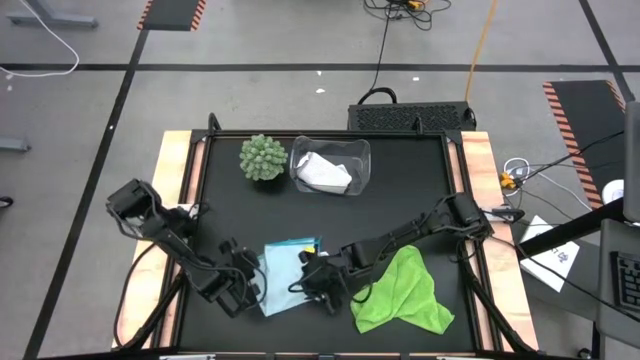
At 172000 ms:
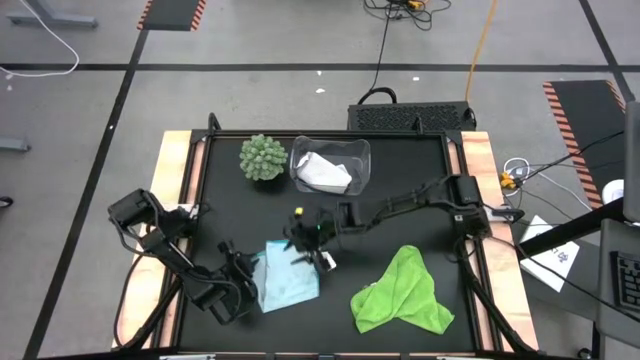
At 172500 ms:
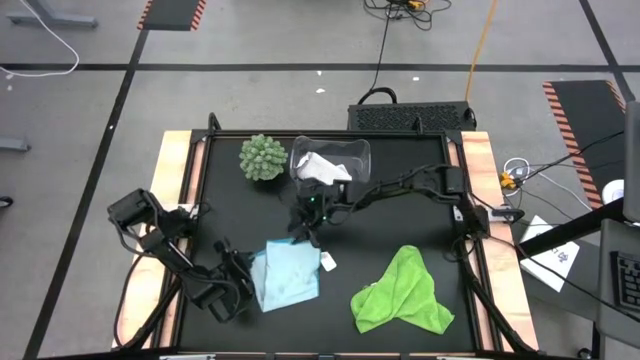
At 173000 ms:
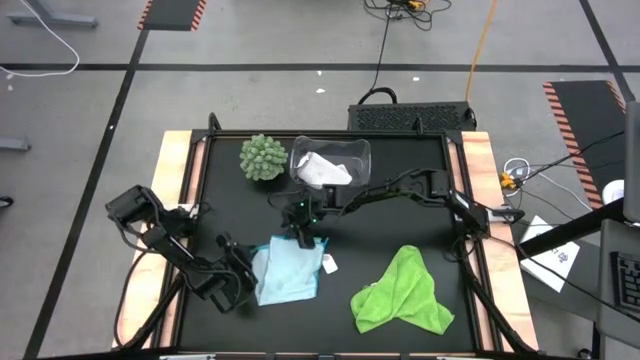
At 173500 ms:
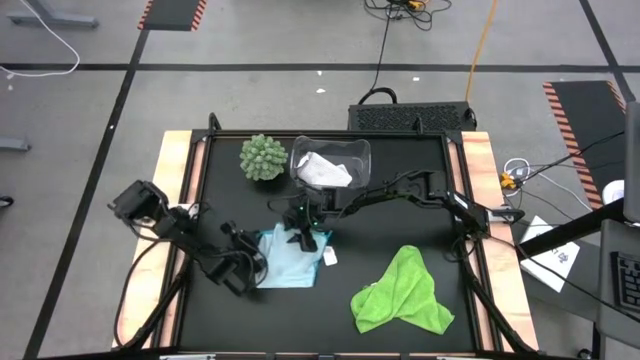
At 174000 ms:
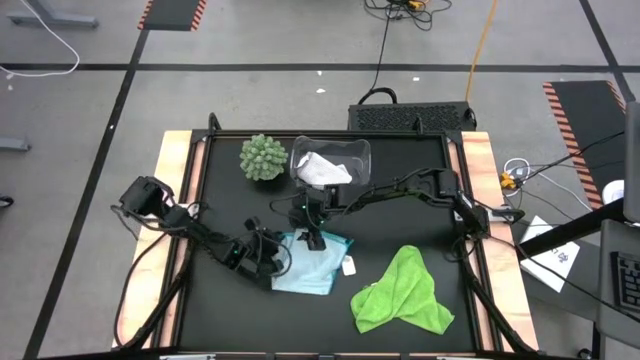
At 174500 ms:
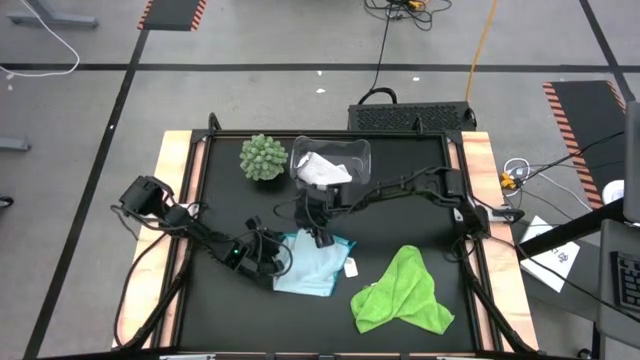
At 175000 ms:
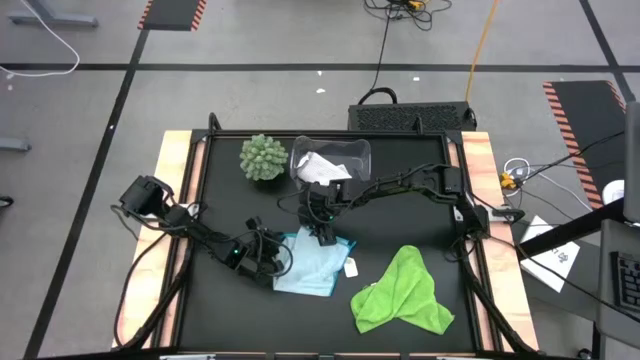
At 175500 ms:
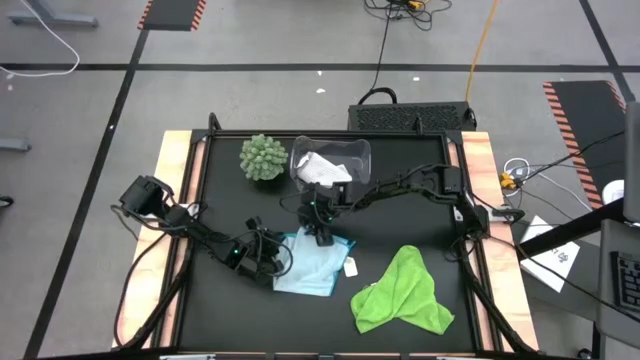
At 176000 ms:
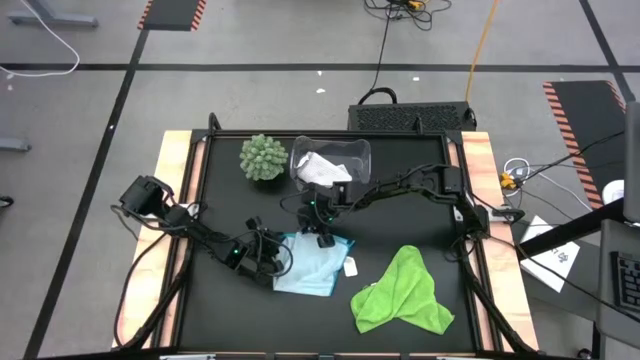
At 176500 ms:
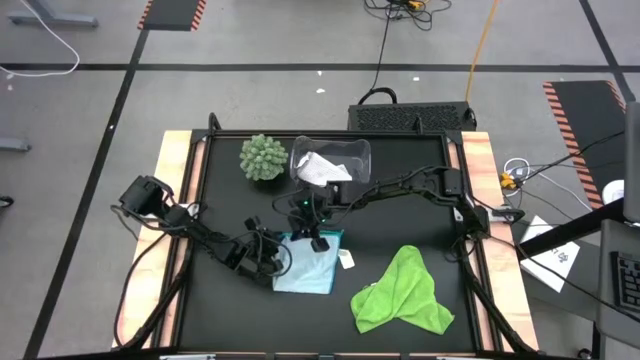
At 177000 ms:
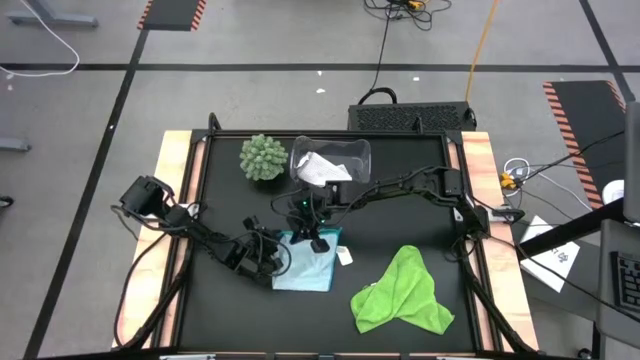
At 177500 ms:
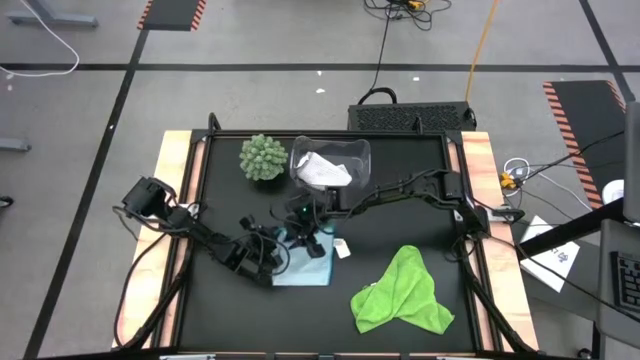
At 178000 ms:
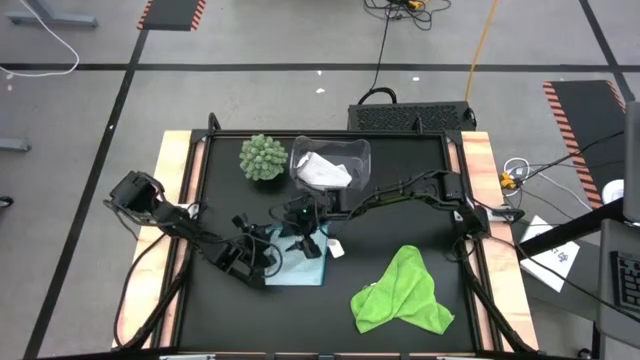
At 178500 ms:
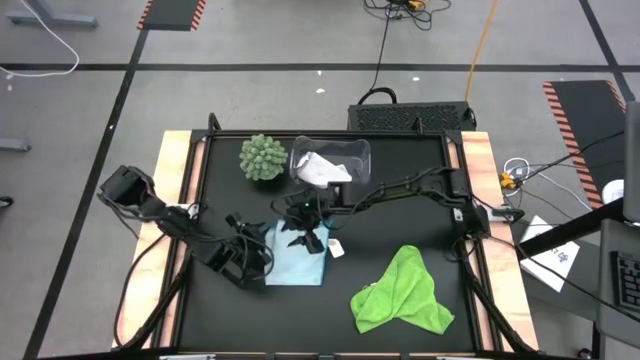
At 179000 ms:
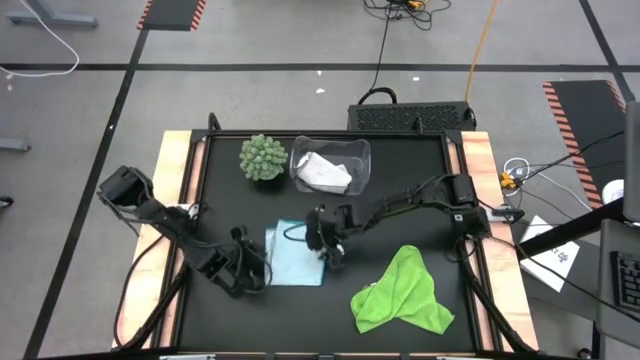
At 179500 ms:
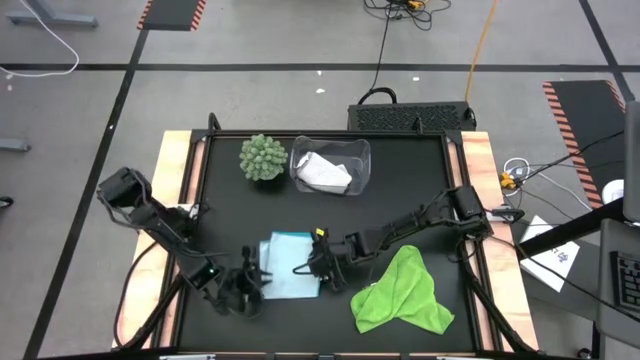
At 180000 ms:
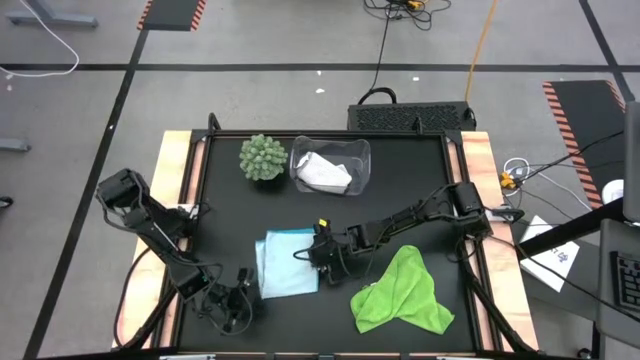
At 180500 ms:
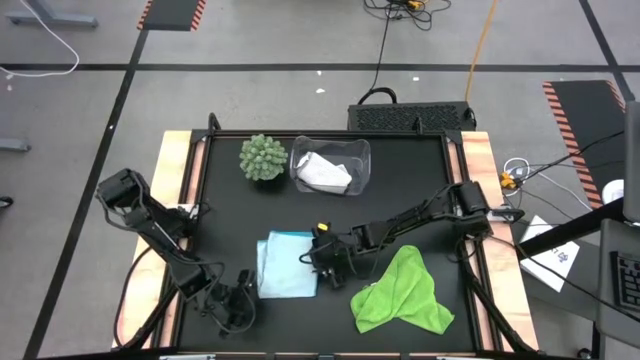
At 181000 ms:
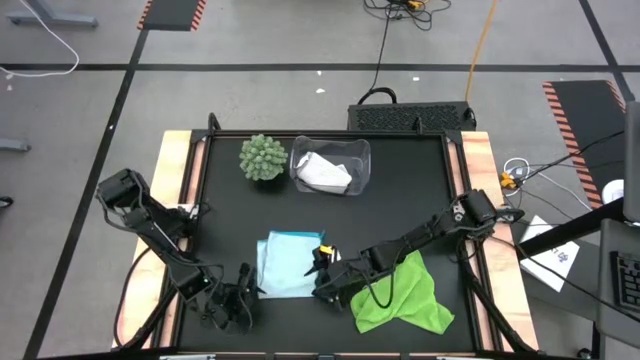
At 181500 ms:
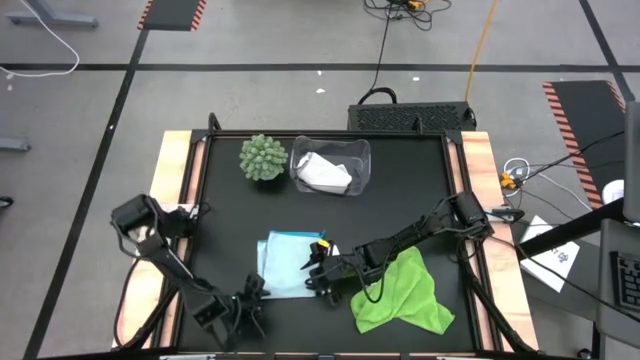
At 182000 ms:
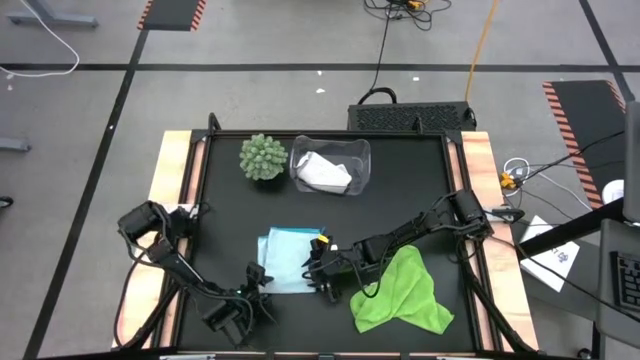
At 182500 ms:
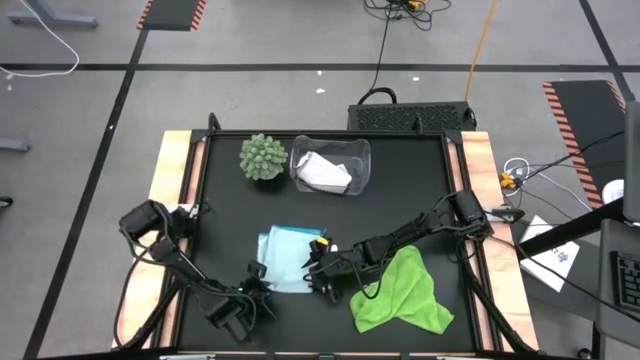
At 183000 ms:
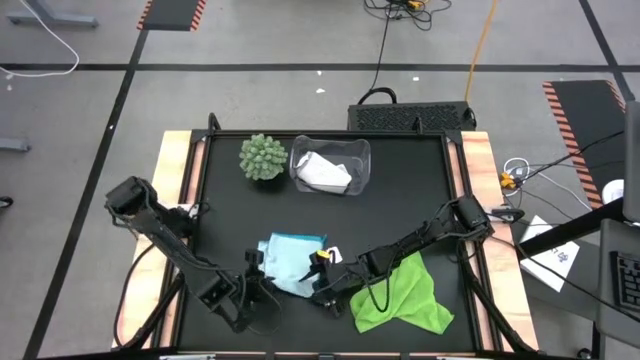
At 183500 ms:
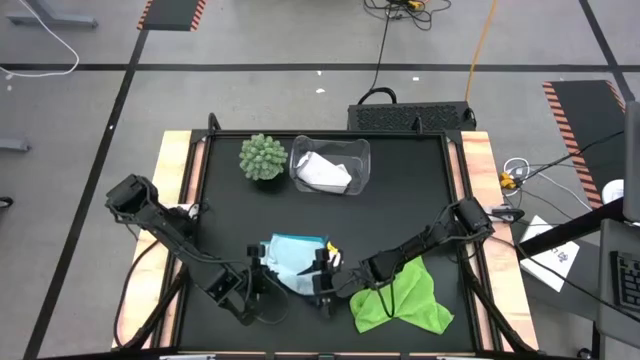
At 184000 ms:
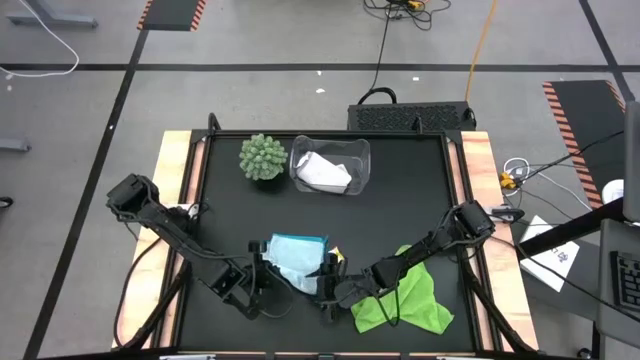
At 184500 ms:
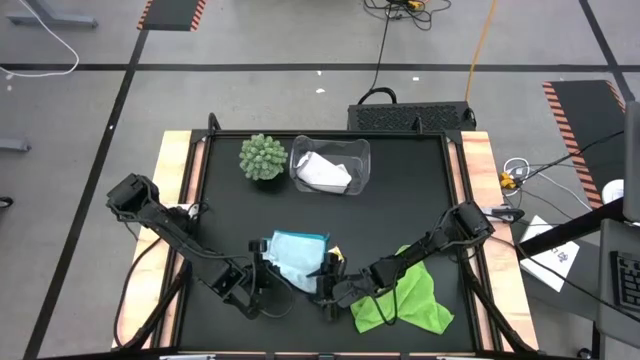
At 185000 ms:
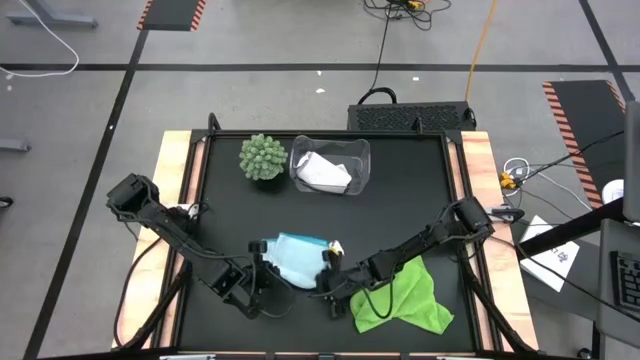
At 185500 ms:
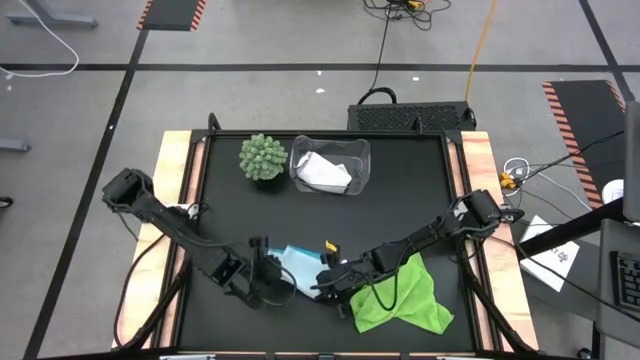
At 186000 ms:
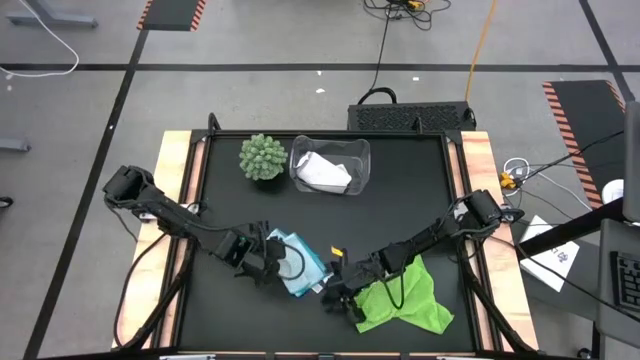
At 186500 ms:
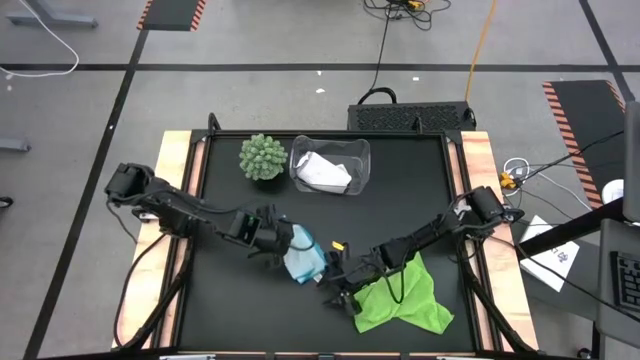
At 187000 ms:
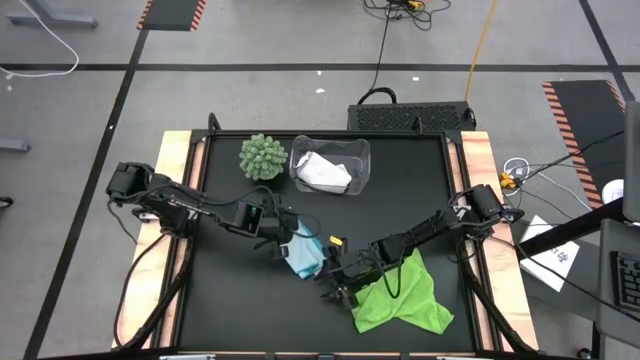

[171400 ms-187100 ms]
Task: Fold microfiber towels
Fold the blue towel

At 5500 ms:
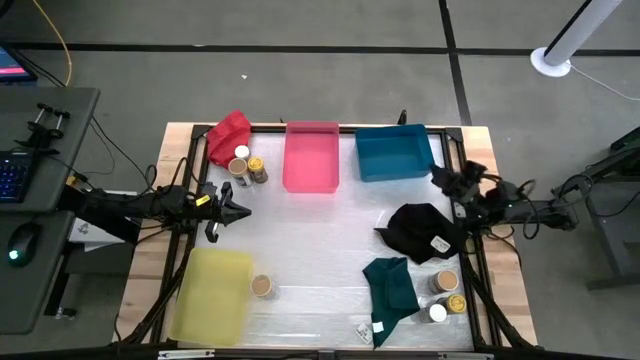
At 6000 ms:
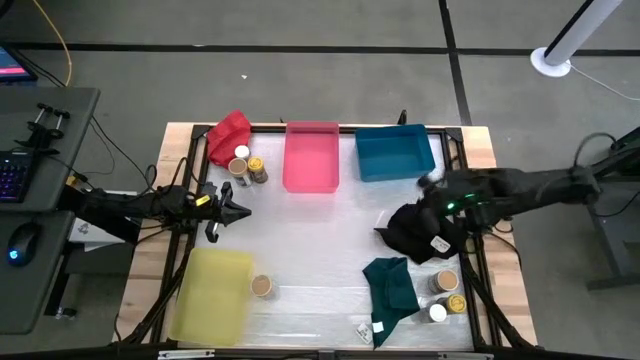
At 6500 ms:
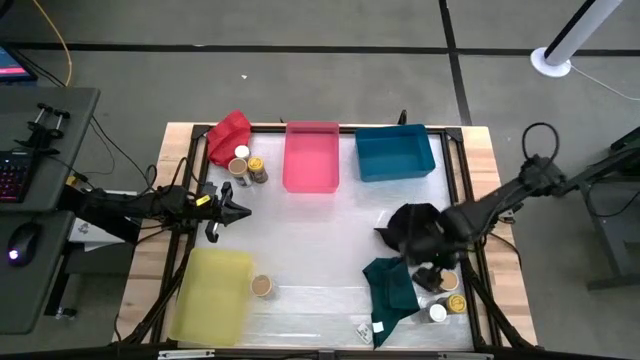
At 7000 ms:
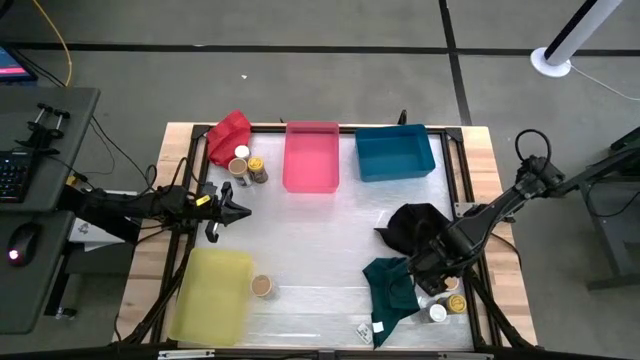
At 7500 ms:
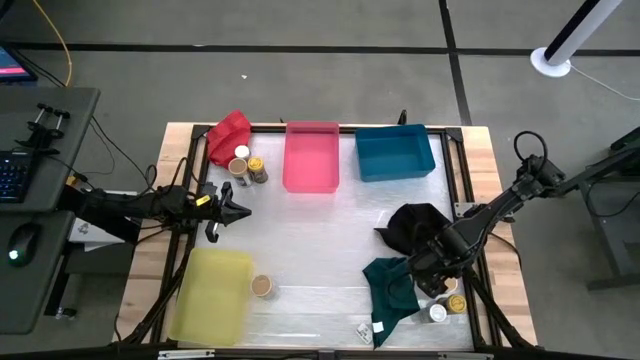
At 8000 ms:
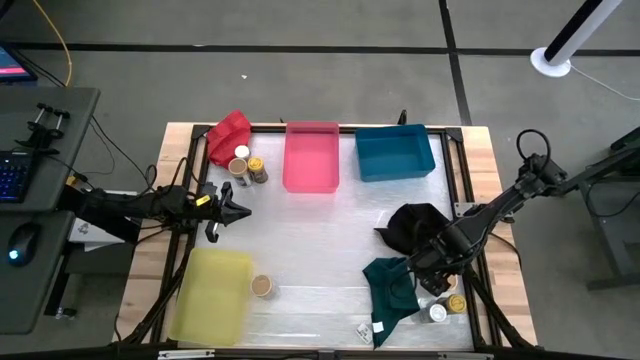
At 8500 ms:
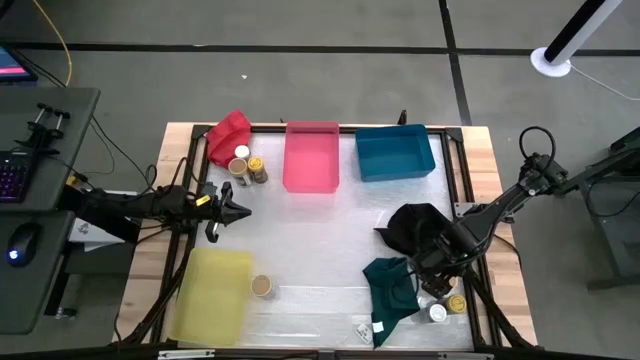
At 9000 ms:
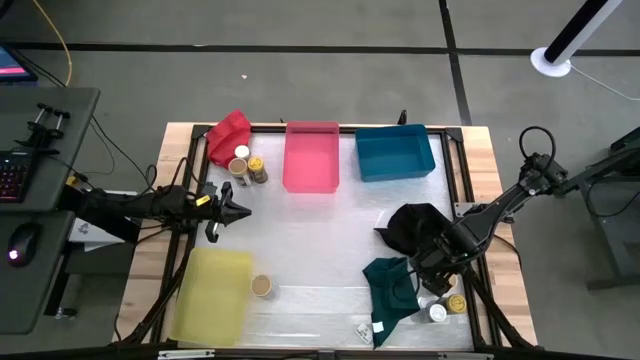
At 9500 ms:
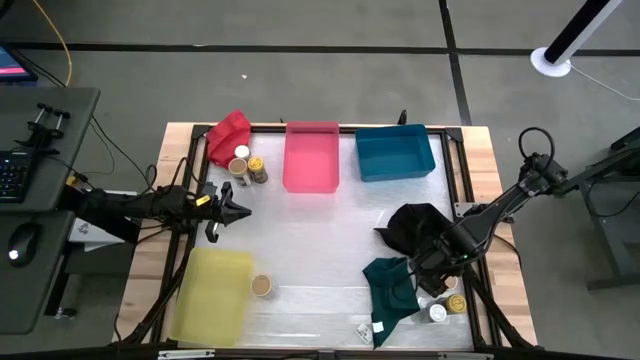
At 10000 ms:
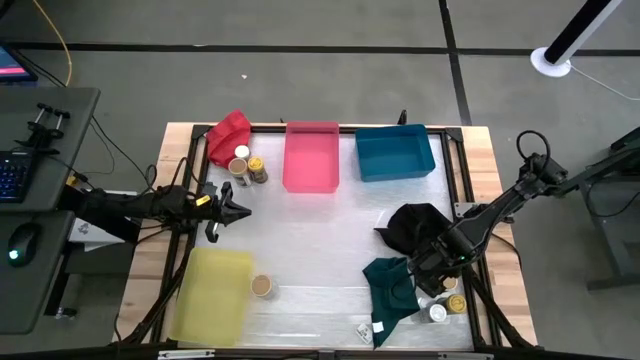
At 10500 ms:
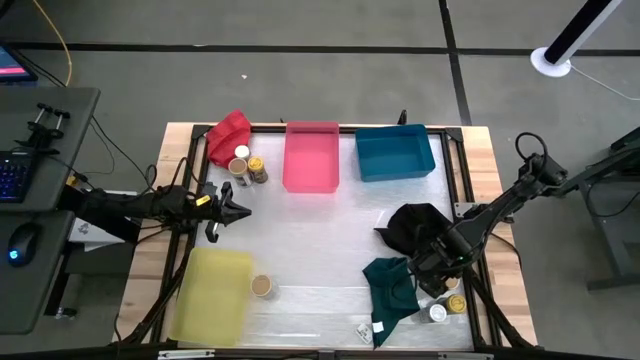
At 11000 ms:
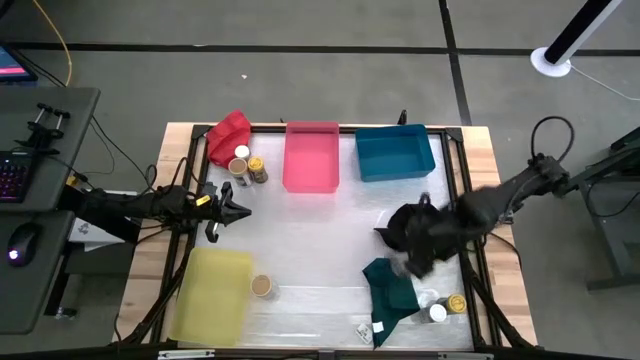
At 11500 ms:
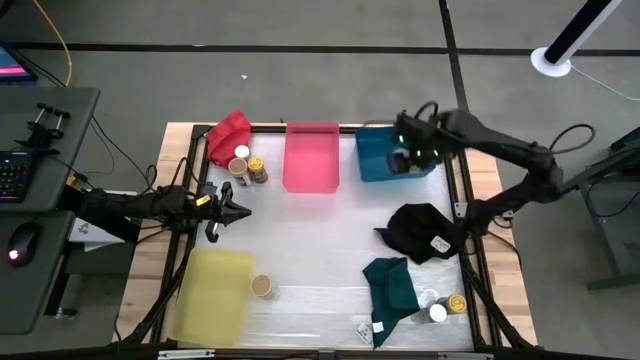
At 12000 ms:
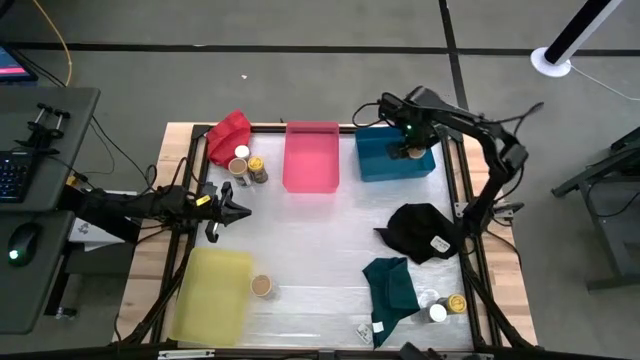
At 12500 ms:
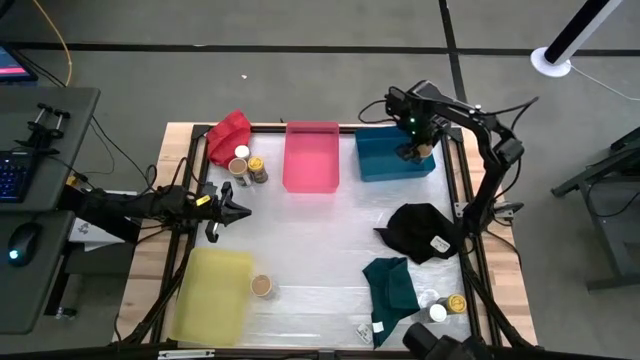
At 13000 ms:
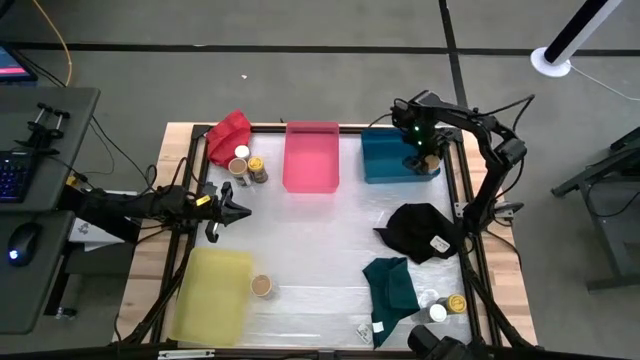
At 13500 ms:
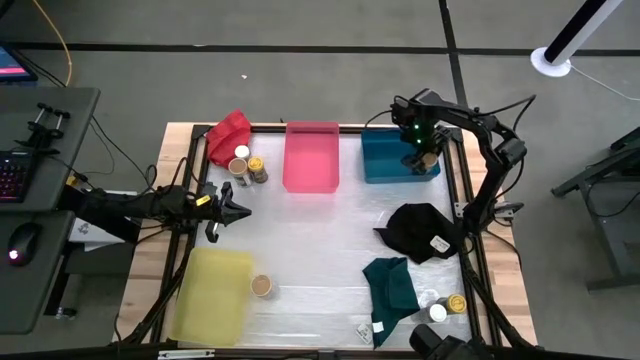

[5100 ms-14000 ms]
Task: Sort spices by type
Put the right gold seasoning bottle into the blue bin
